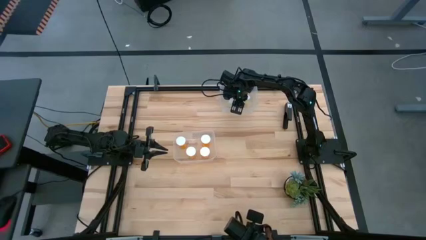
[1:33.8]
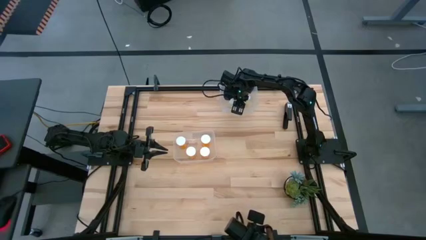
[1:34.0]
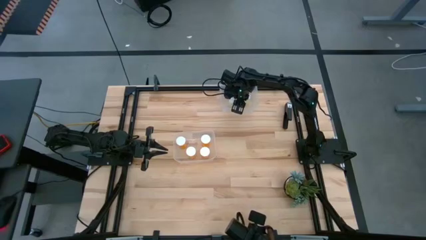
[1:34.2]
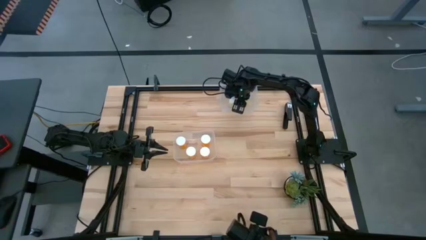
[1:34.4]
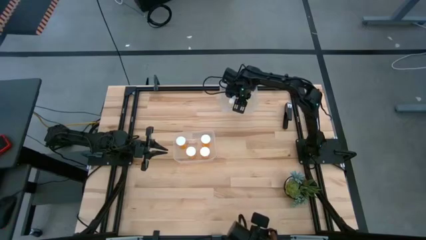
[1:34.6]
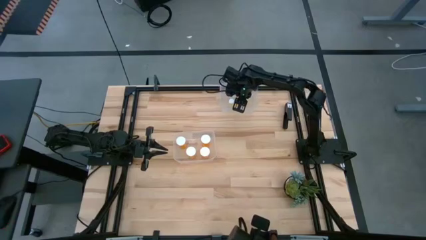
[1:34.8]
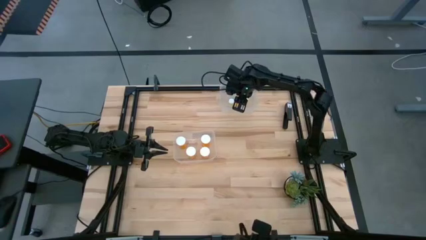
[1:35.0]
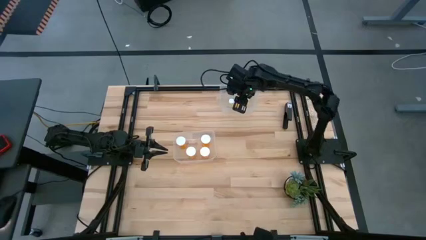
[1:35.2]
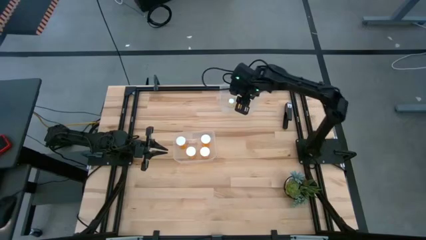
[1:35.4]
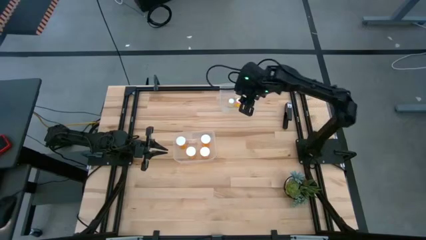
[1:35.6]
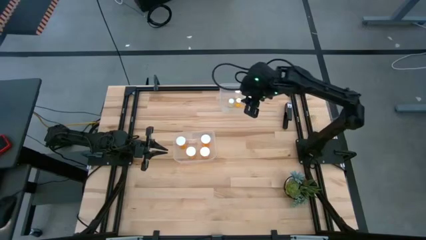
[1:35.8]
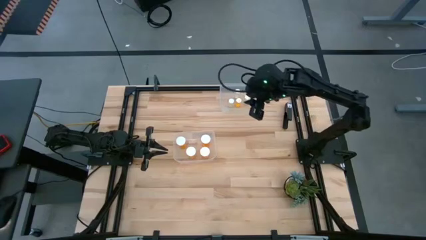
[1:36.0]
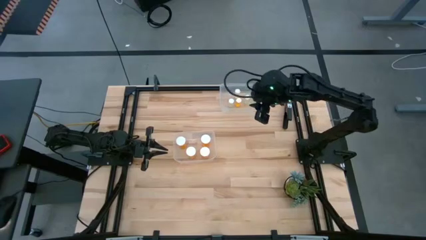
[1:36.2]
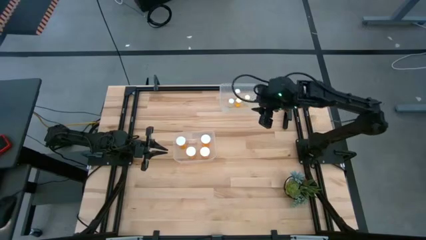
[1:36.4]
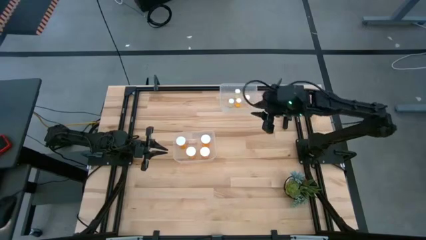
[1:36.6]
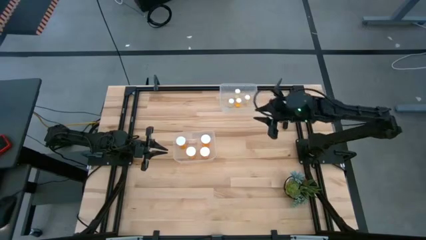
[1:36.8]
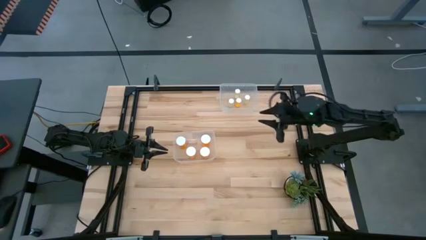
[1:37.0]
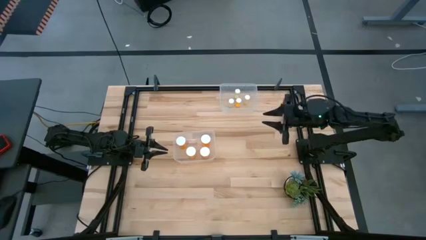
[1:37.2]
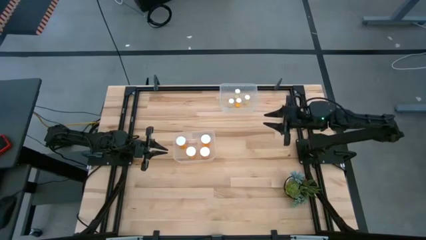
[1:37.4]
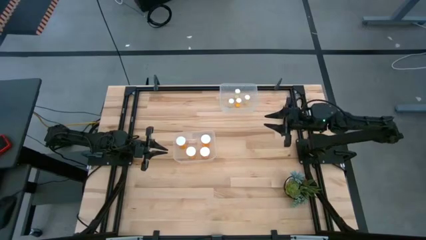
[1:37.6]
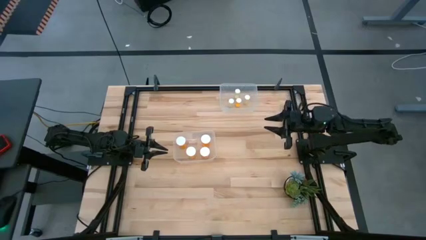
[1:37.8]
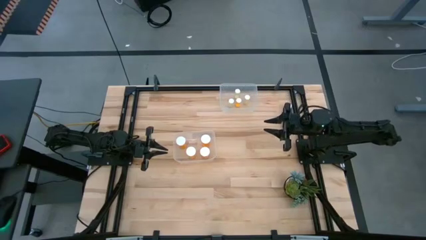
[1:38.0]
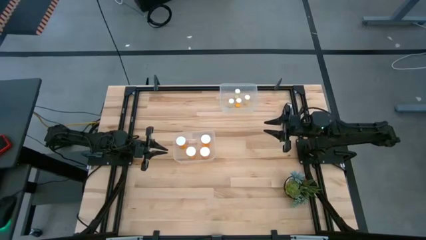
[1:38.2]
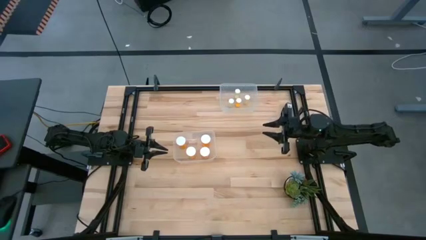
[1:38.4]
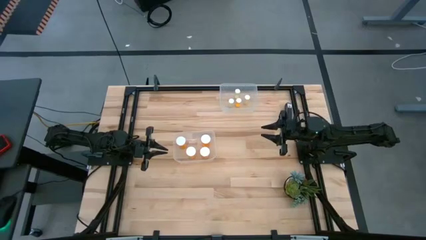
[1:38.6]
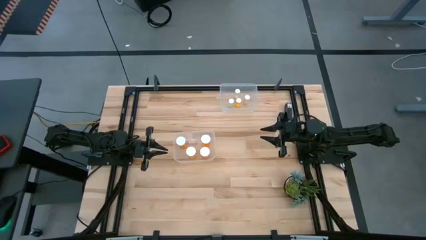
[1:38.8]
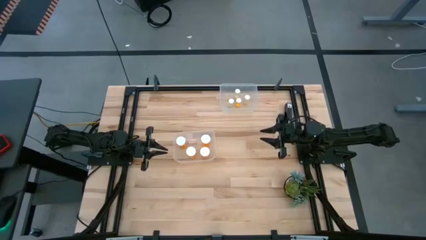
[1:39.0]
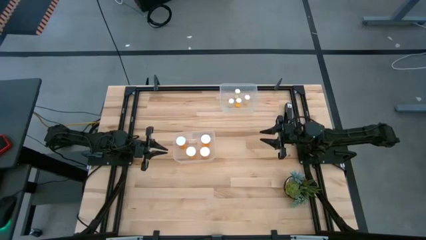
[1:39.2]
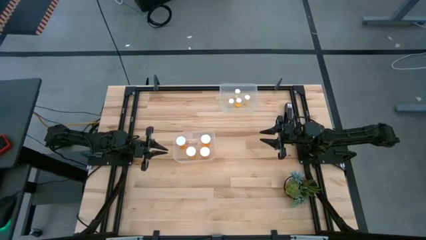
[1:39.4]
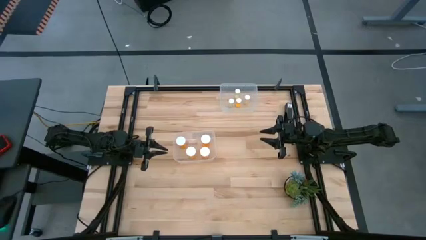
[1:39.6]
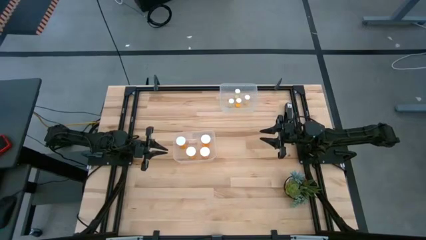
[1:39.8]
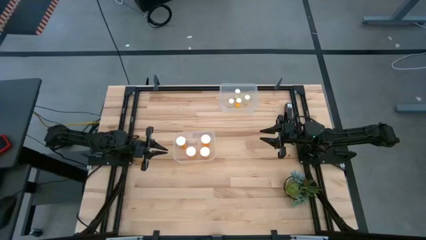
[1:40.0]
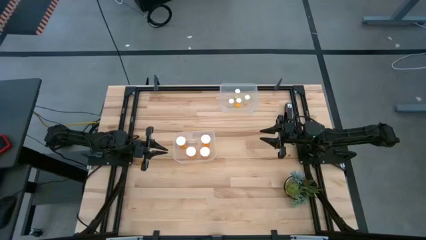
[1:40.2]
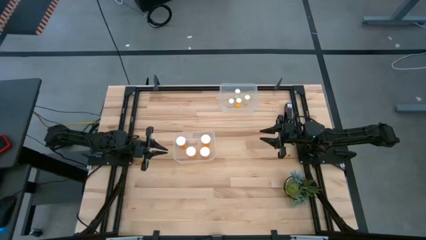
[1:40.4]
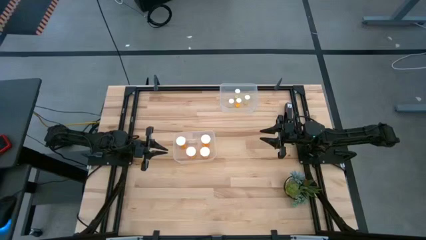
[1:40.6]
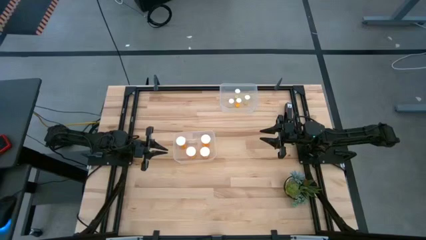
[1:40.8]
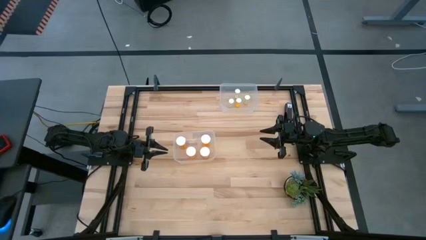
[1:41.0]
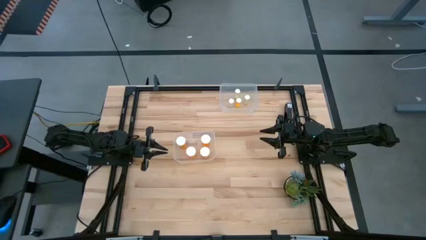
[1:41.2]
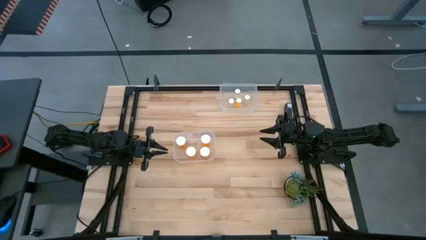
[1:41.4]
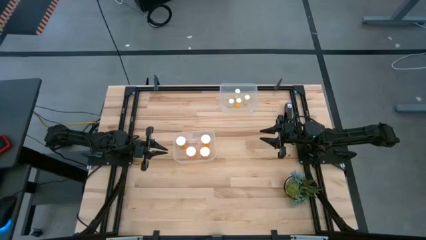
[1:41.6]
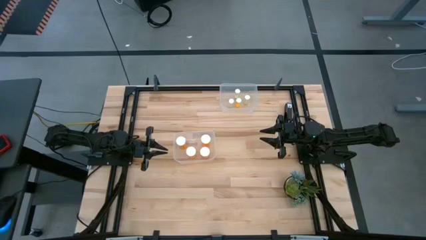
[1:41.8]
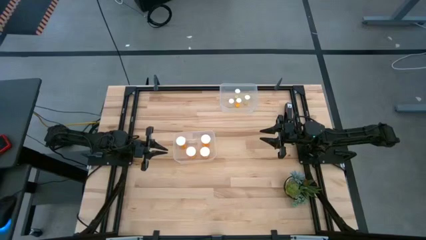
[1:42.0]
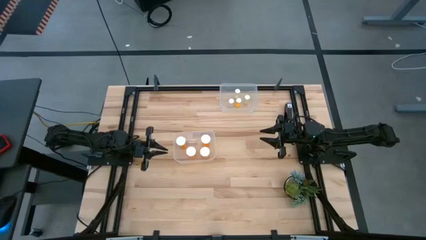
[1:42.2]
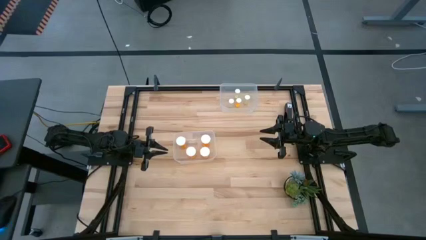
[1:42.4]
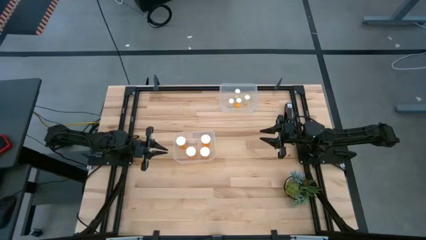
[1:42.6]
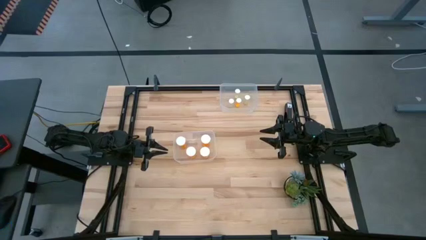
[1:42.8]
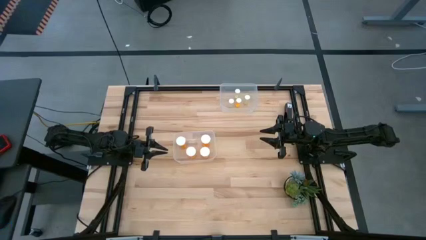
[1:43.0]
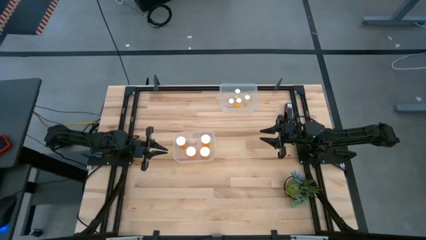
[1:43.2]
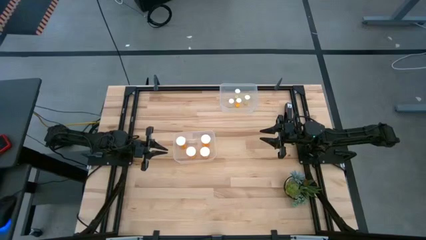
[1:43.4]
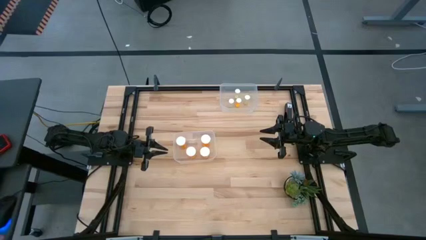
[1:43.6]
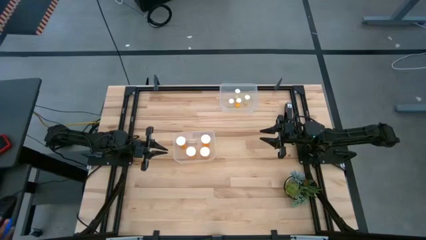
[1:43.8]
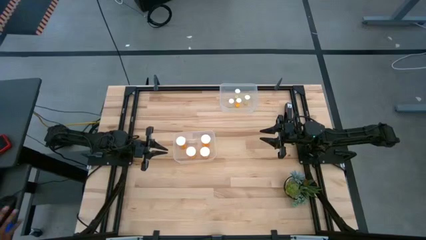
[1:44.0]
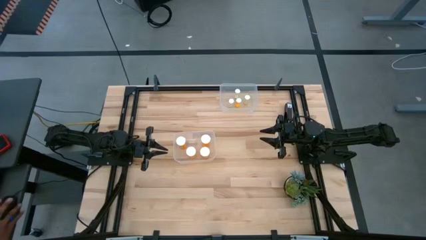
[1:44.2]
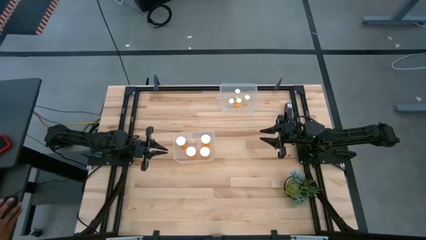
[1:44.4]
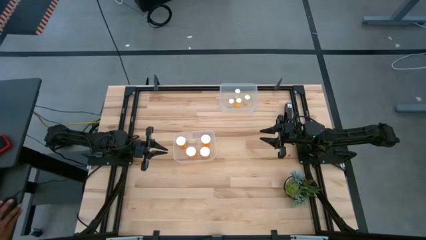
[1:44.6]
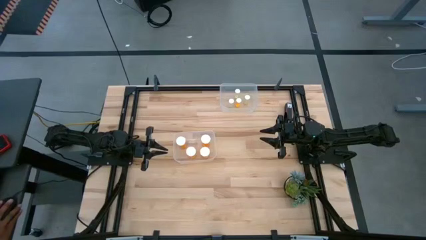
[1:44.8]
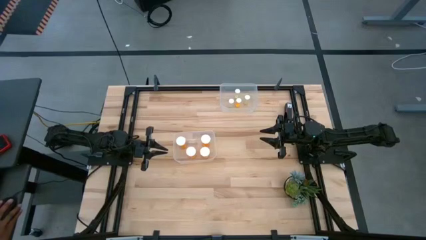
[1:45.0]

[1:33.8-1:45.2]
Task: Pick and place medicine bottles into bin by pill shape (circle, oval)
Return to Home Position
